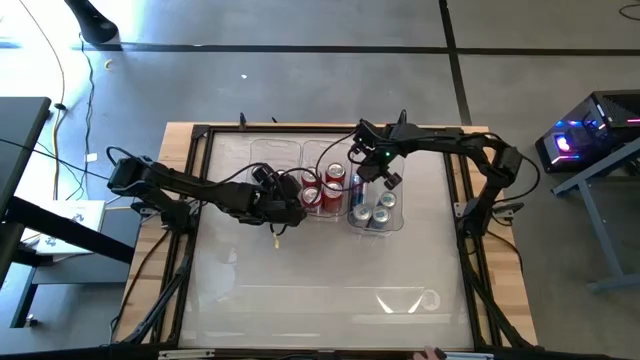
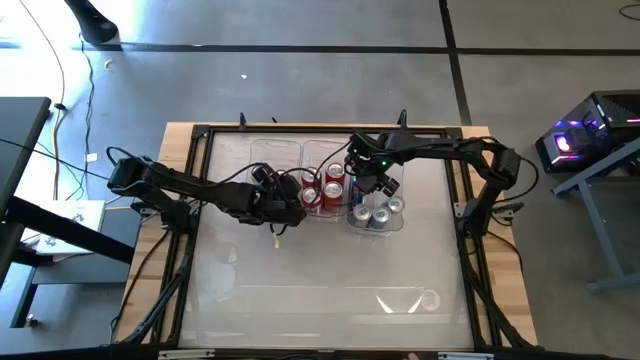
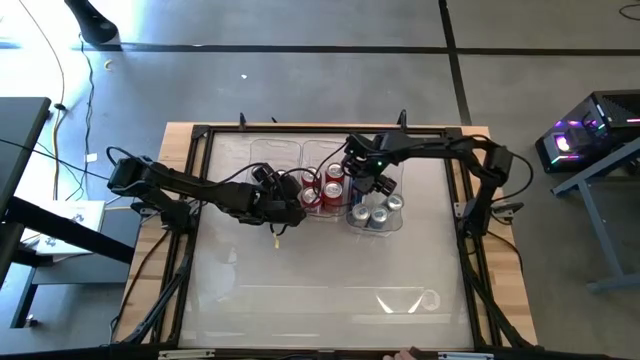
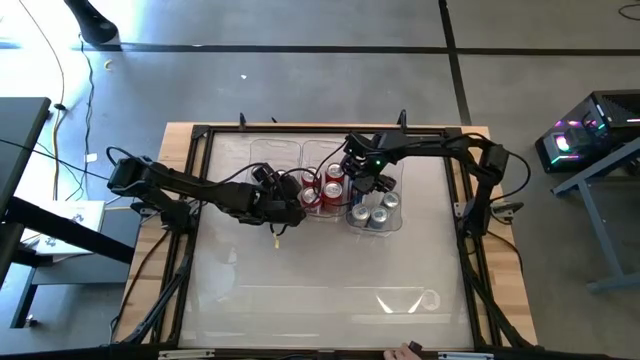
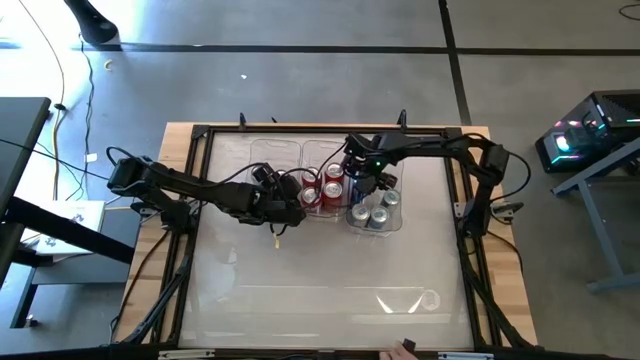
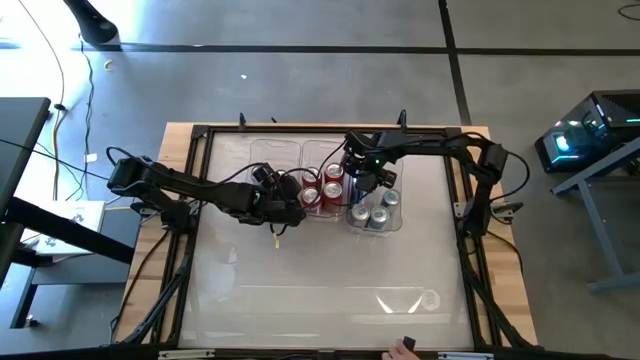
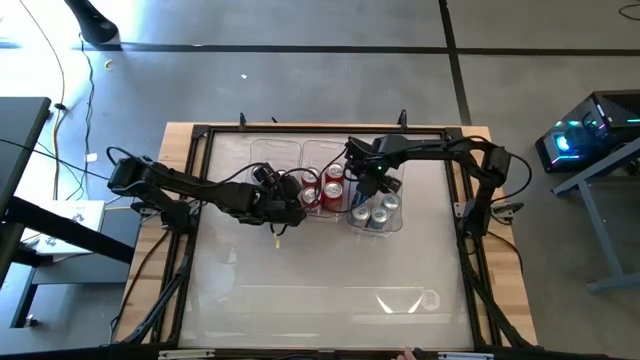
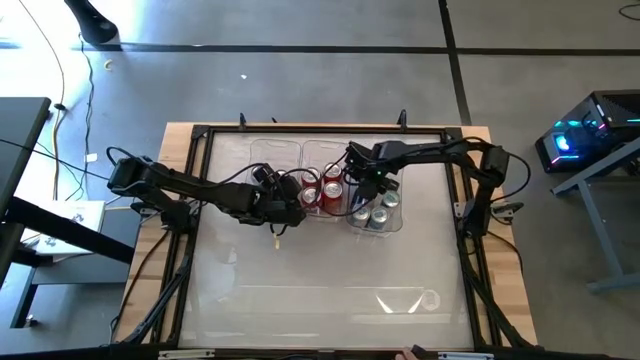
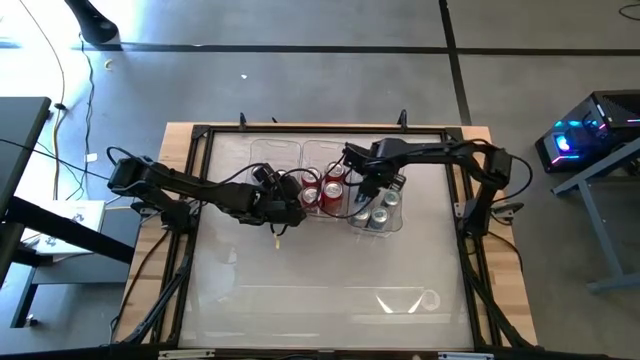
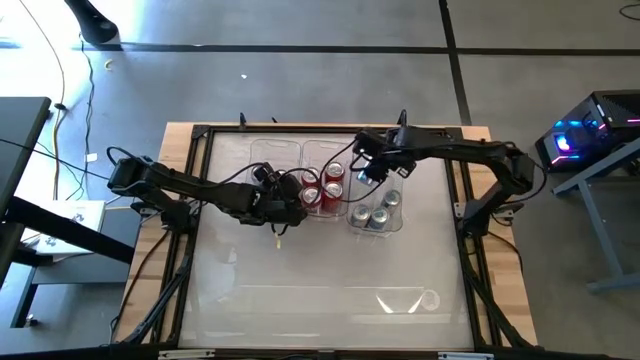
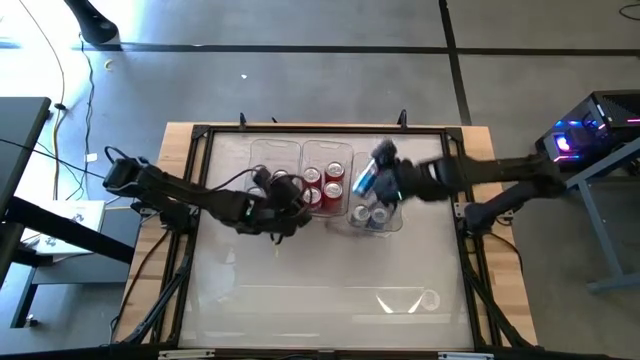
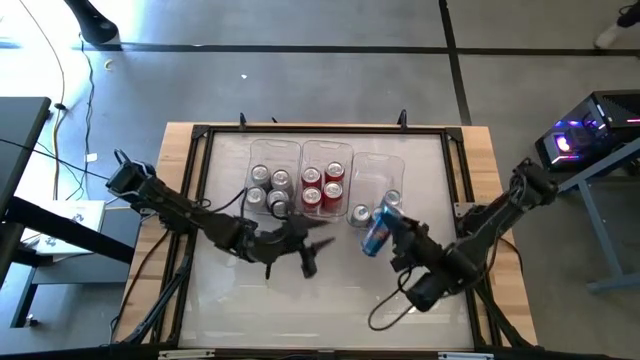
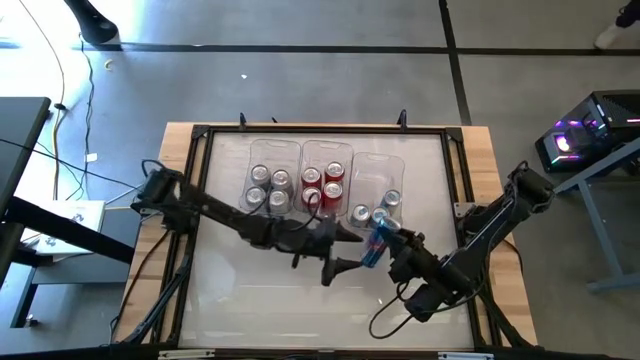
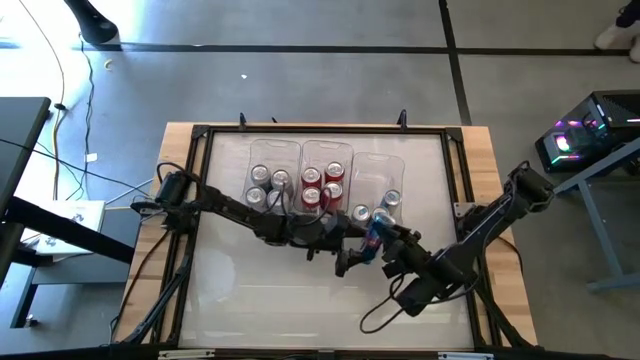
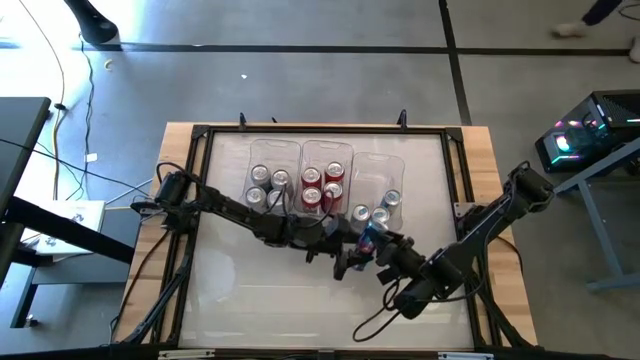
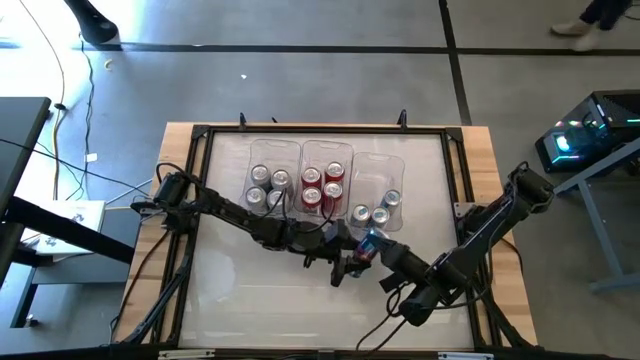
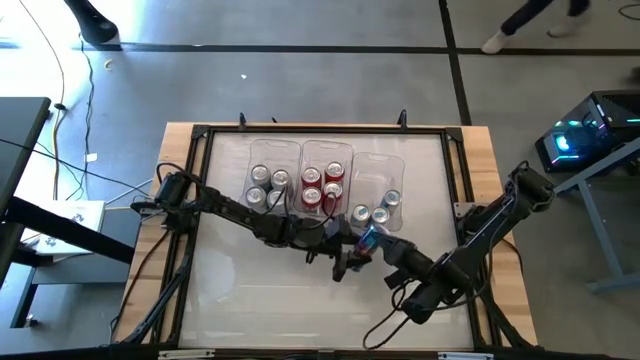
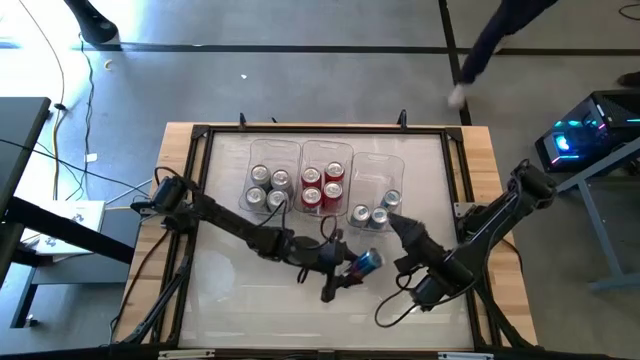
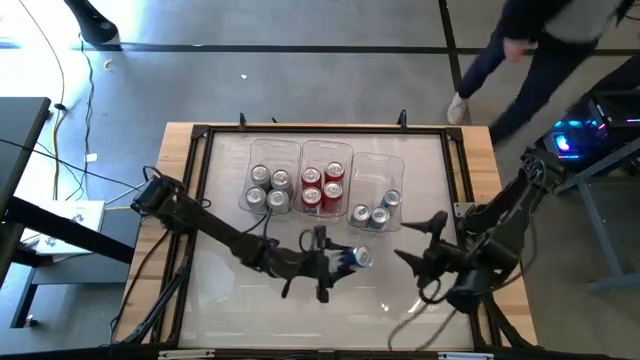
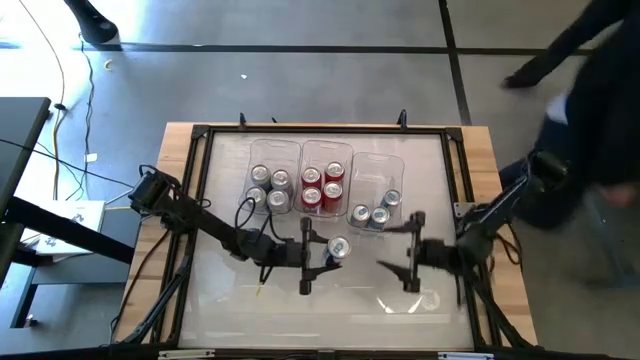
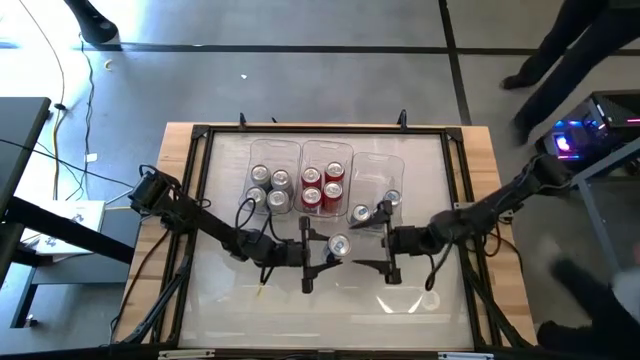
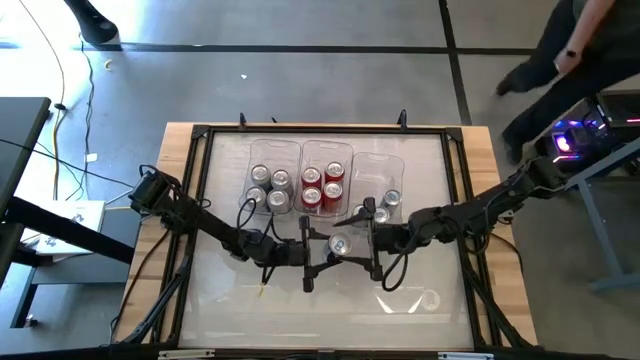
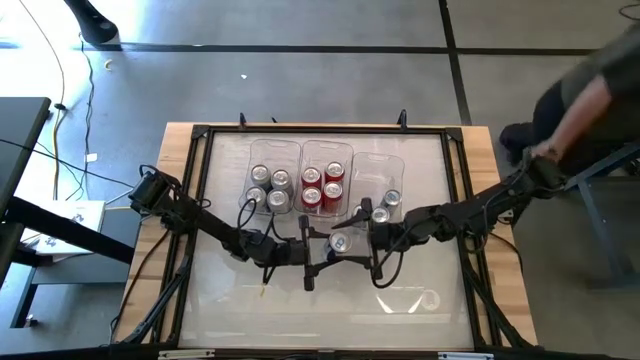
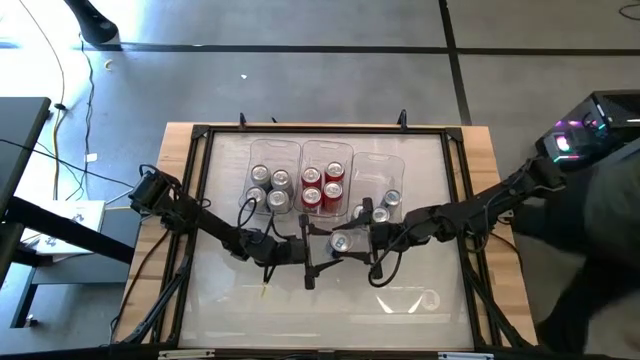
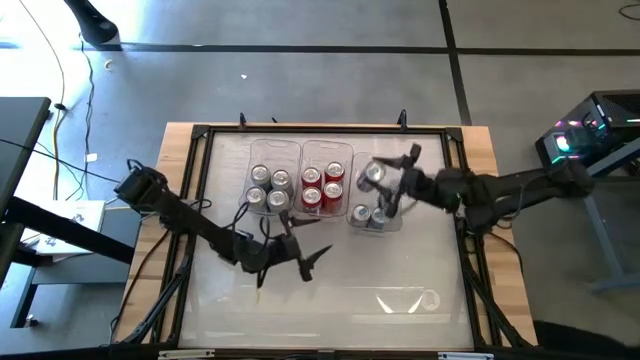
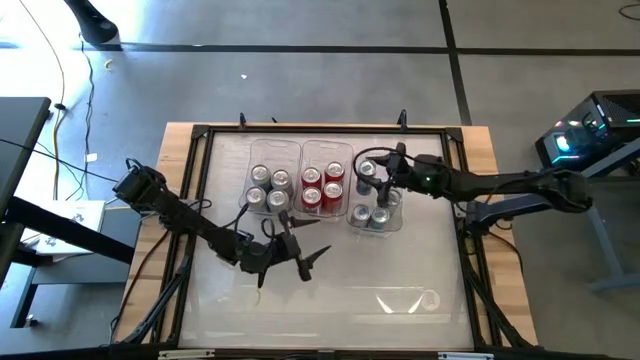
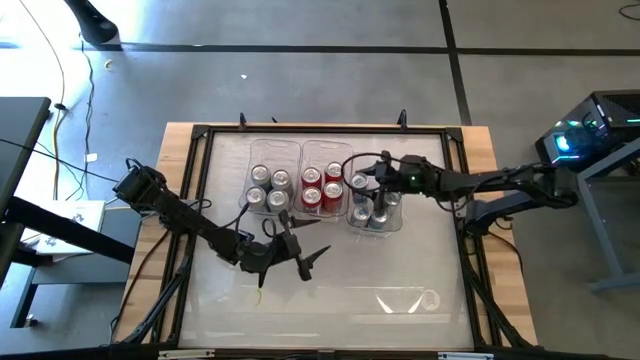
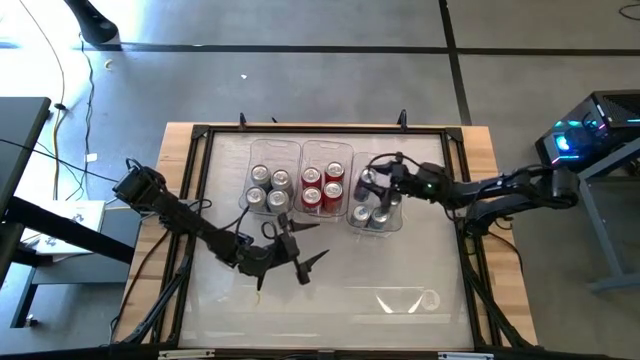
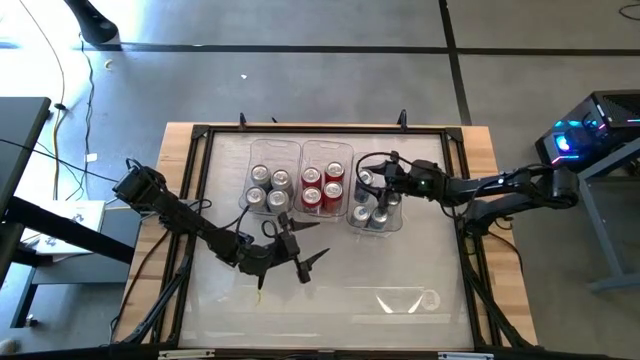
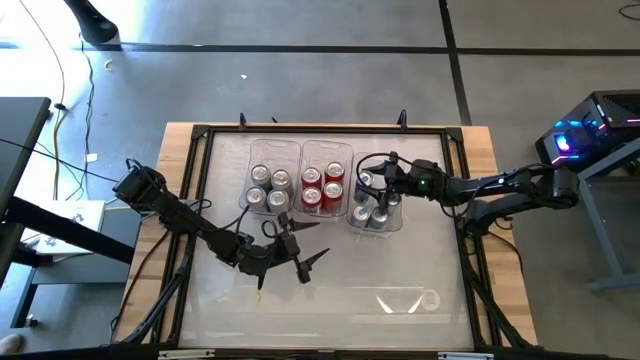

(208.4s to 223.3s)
Task: Sort soda cans
Put the top left blue soda can inside the right transparent bin upright

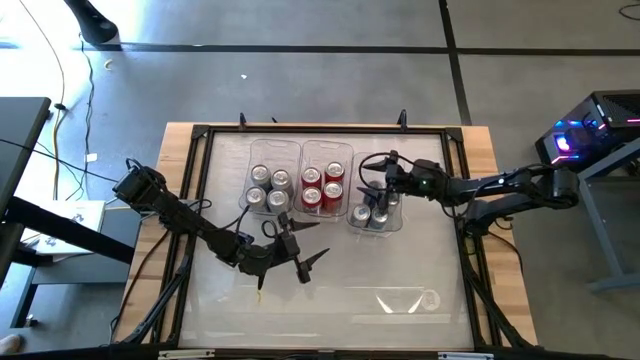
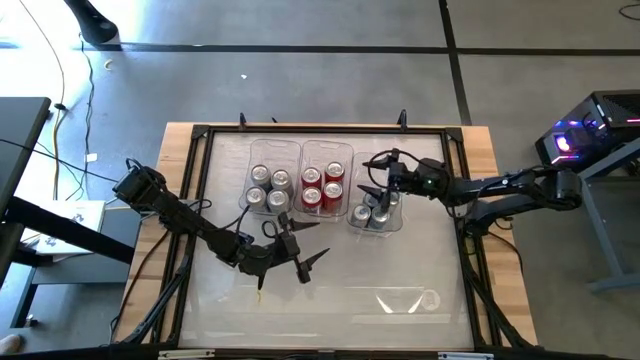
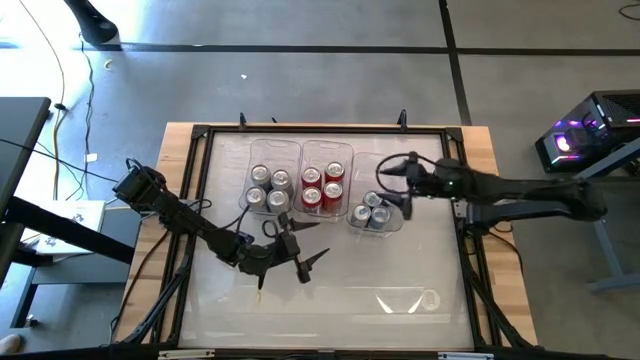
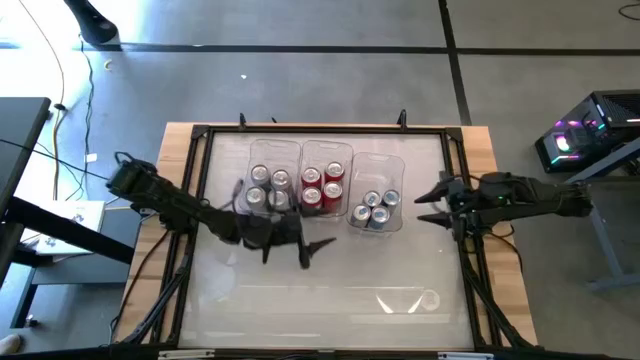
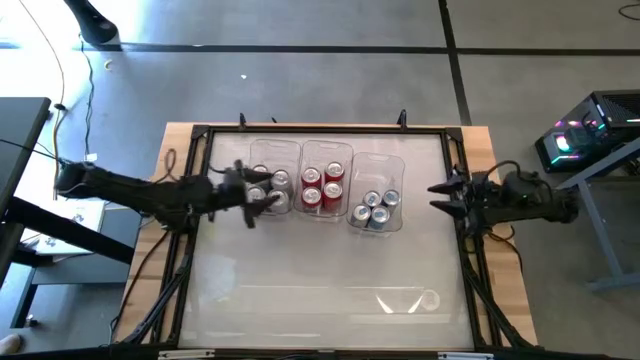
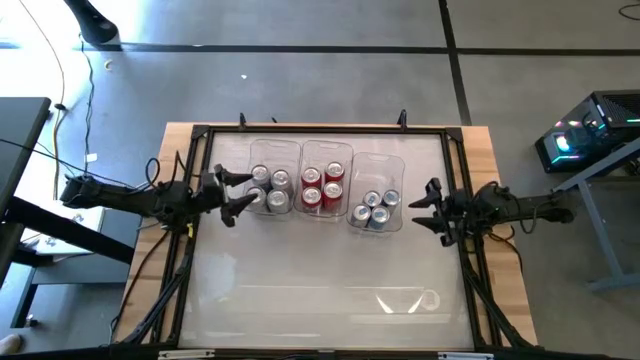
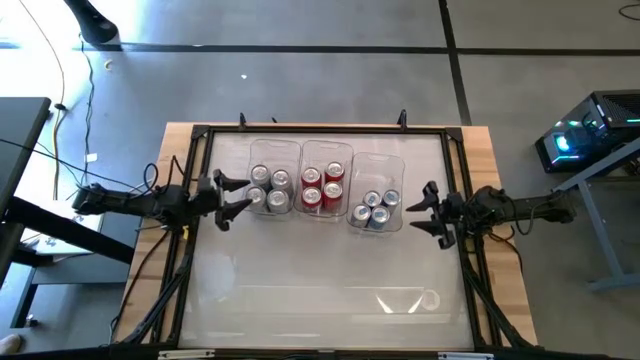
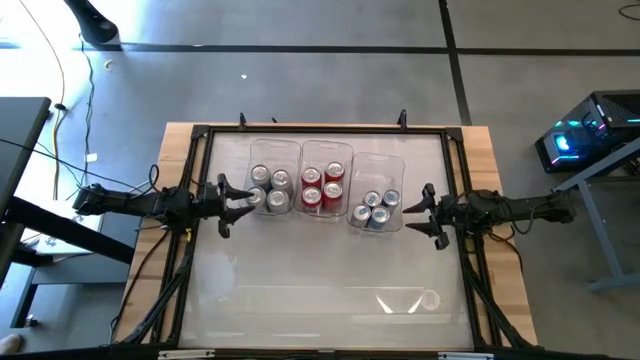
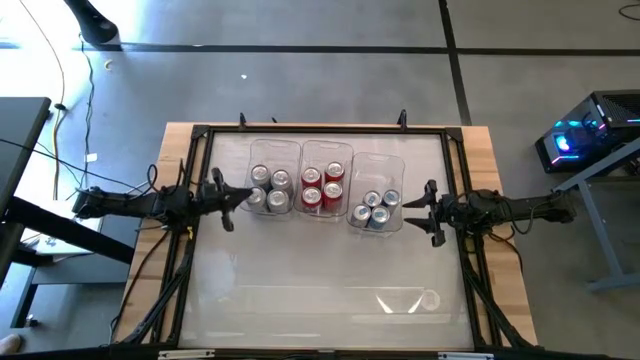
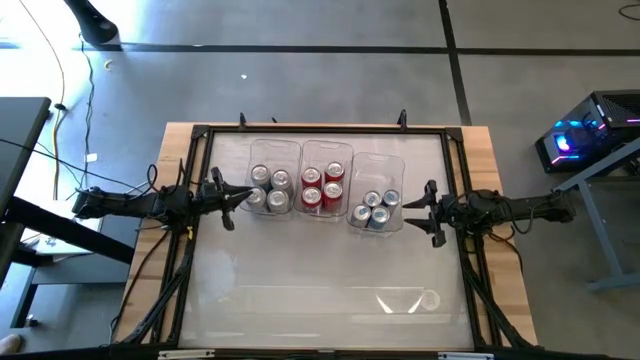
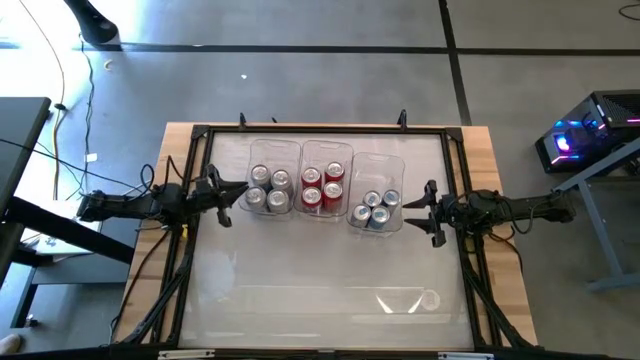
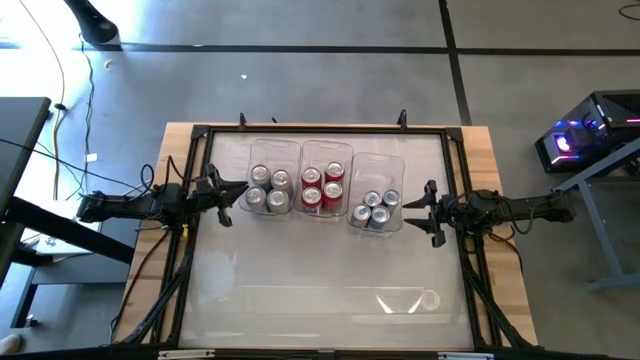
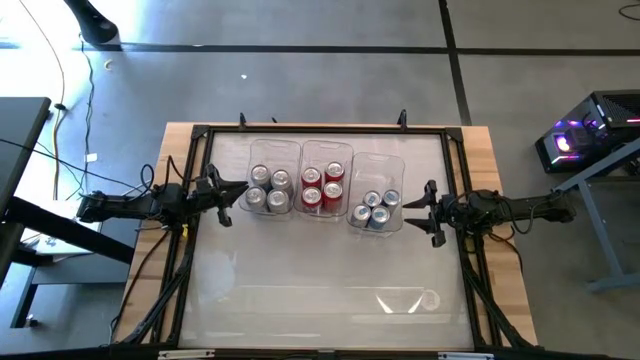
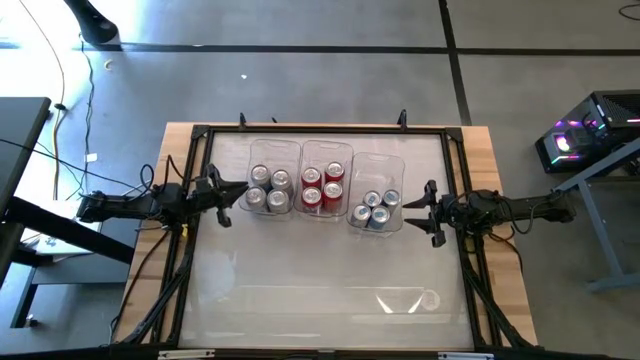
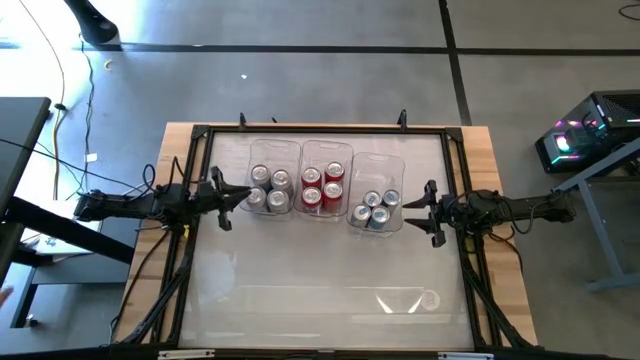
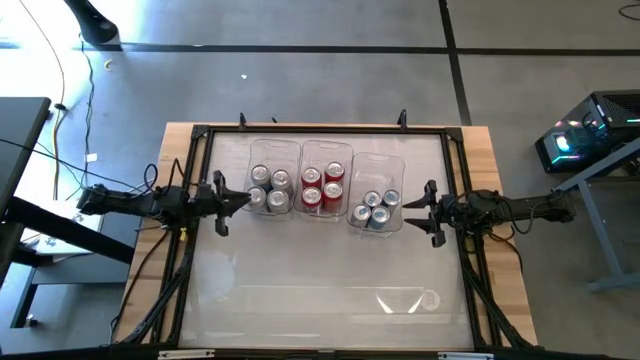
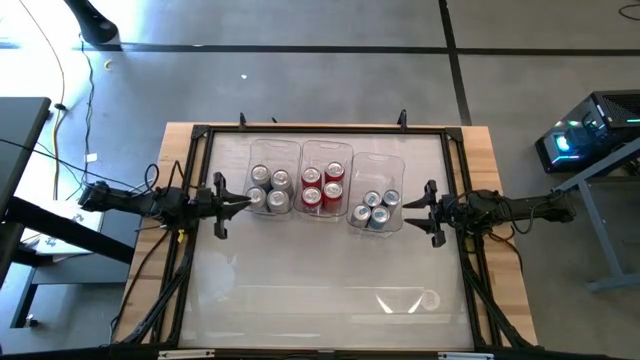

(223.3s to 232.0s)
Return to Home Position
